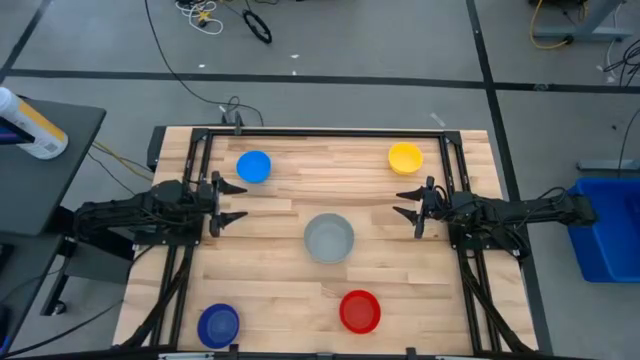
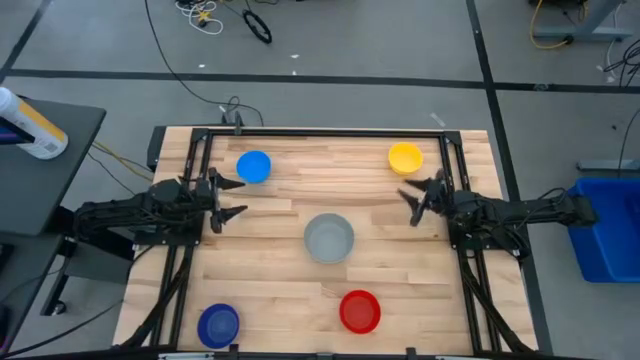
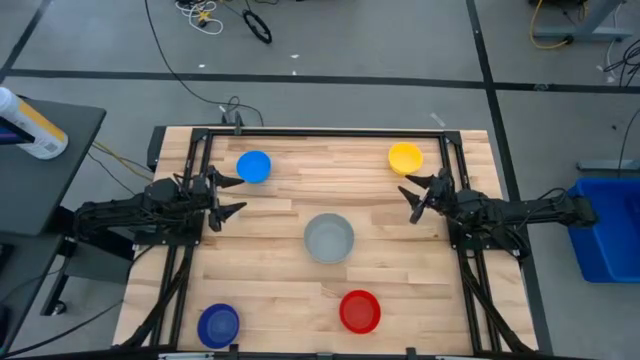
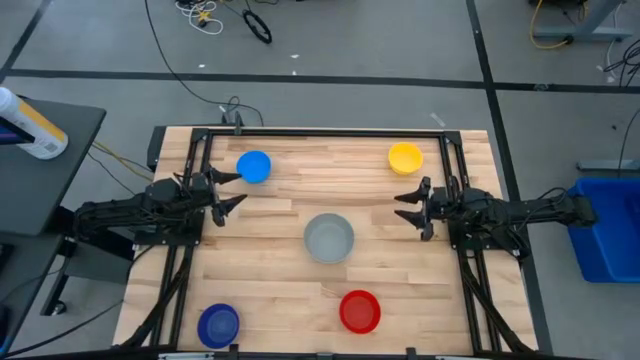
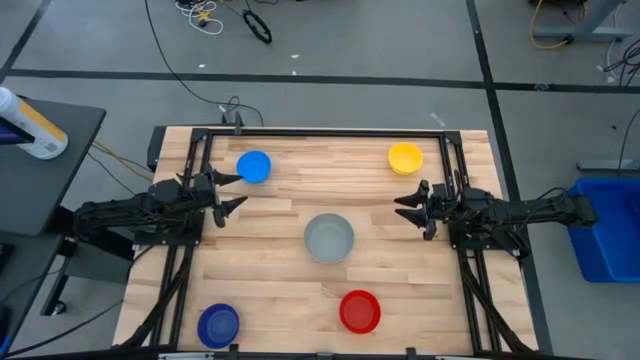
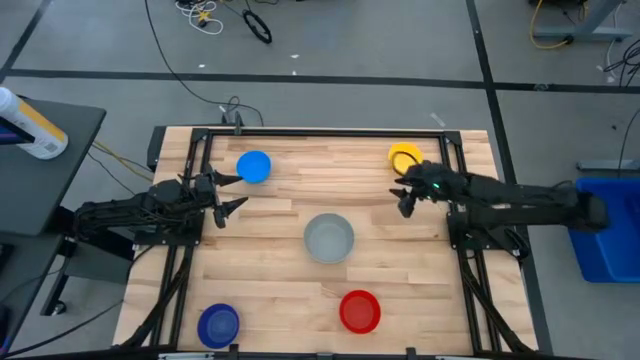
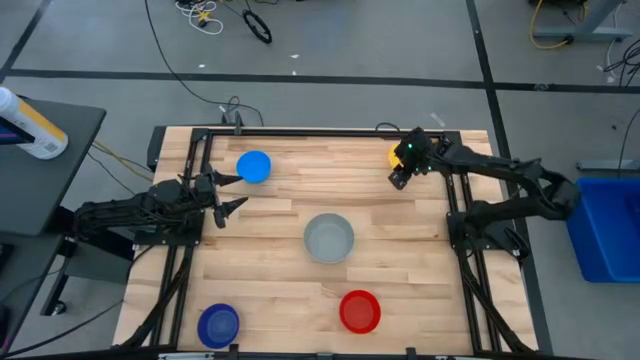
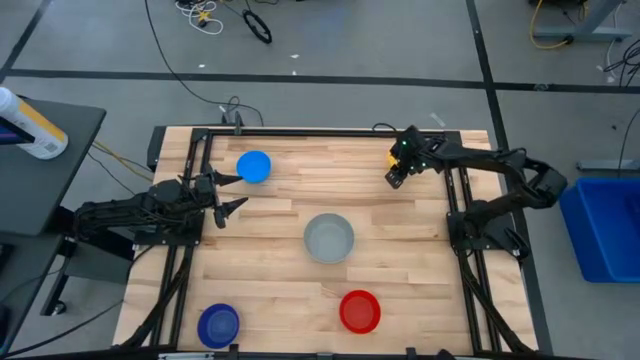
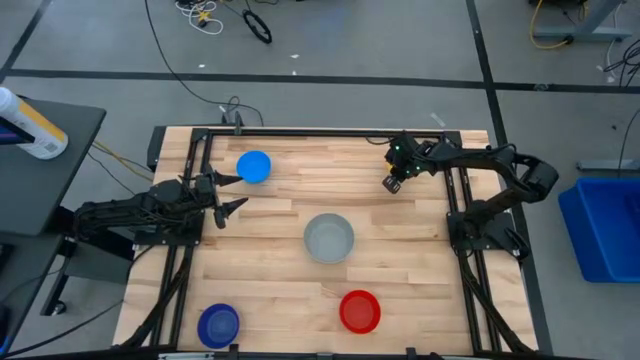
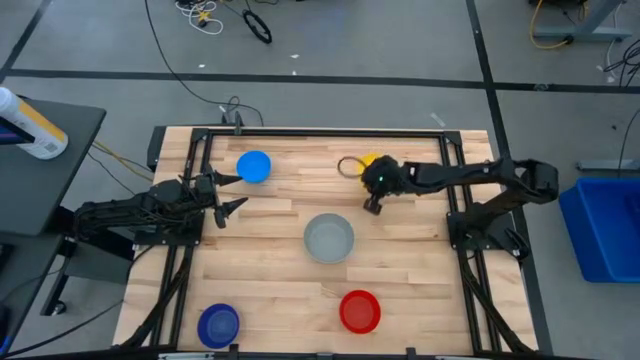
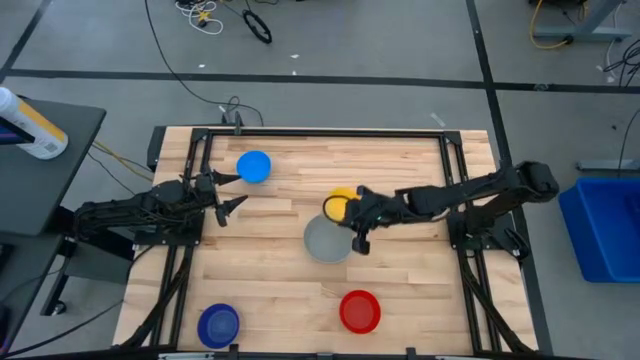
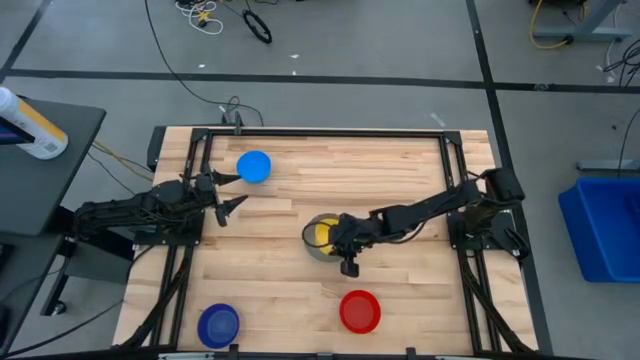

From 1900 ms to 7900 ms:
Stack the yellow bowl on top of the gray bowl

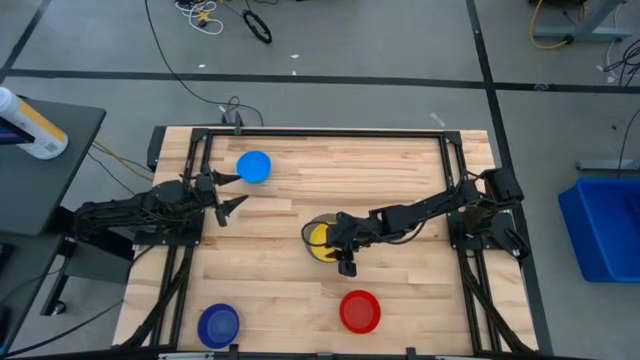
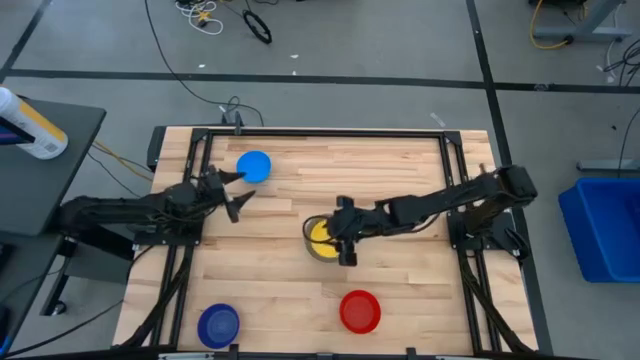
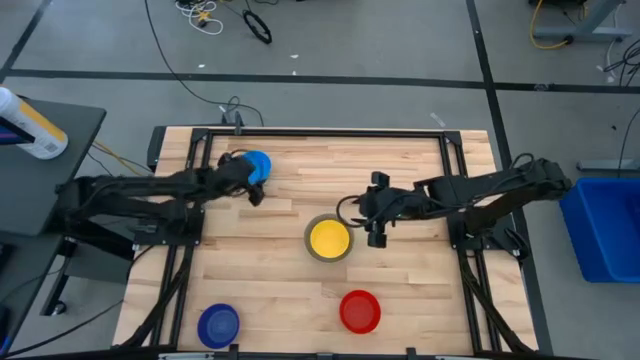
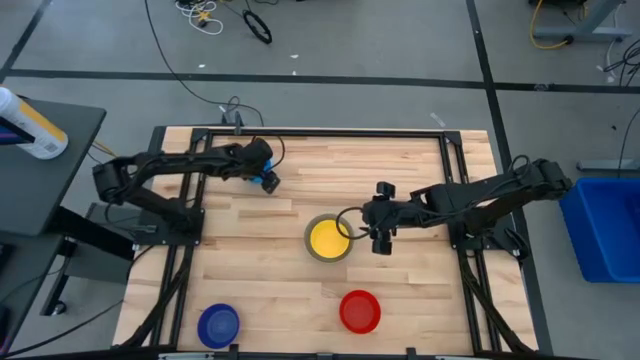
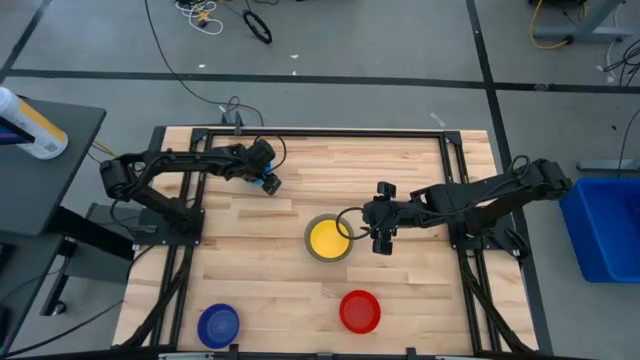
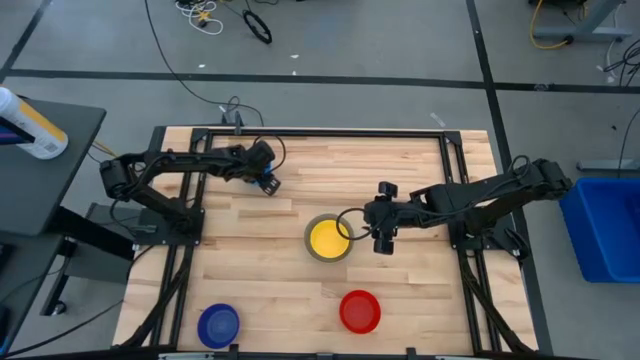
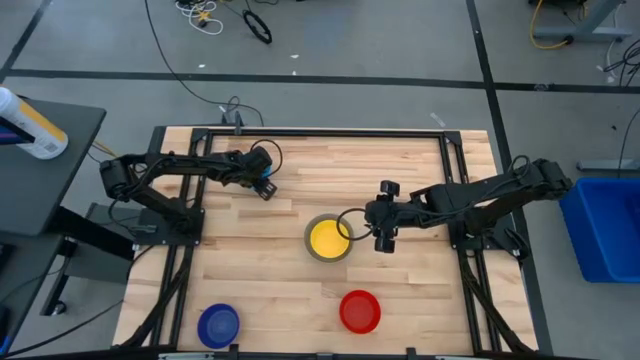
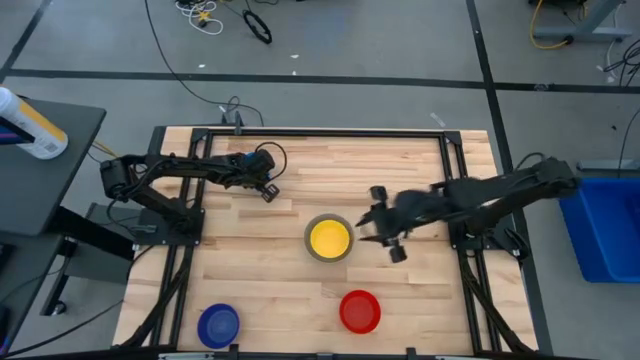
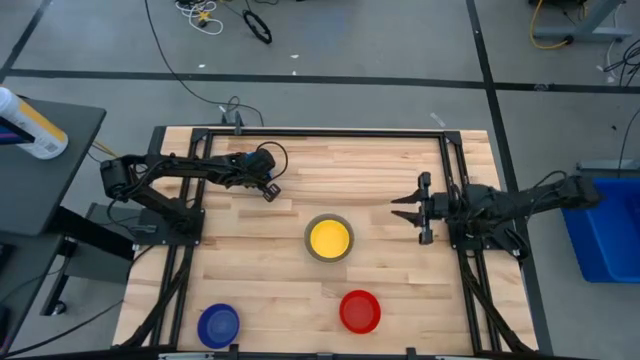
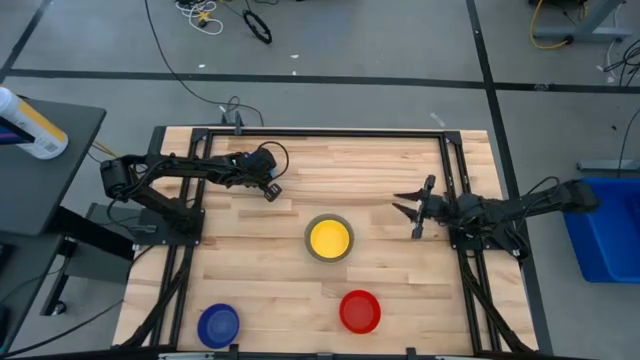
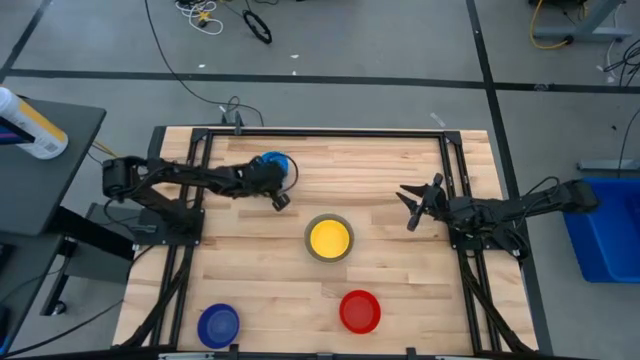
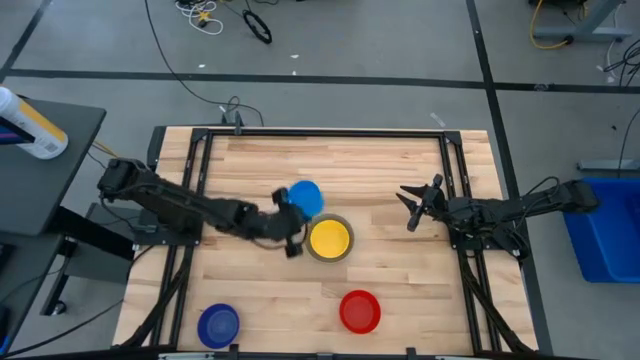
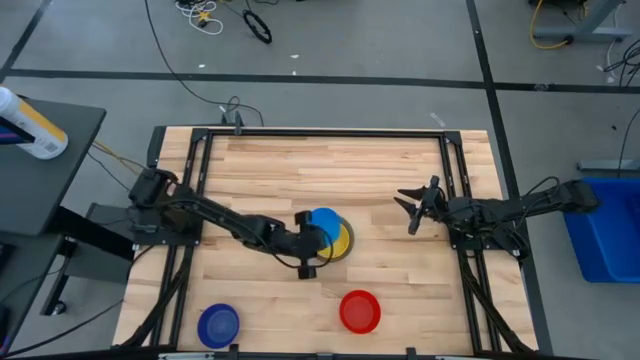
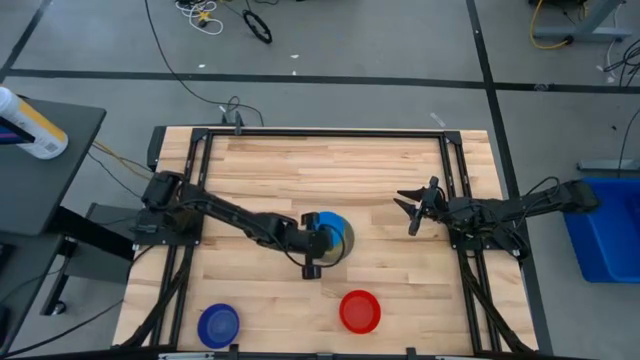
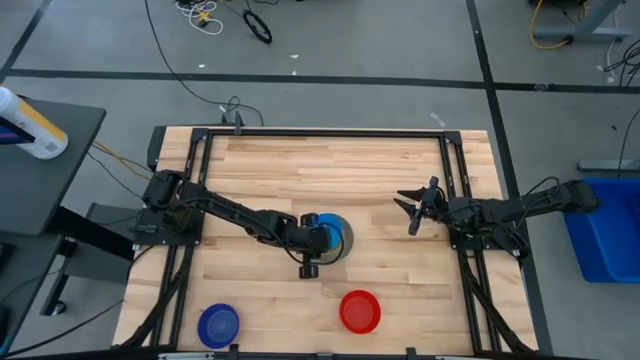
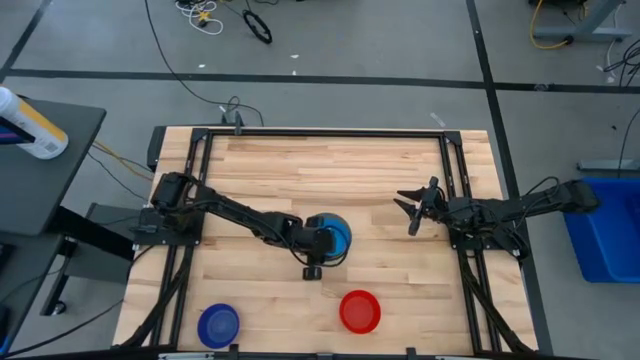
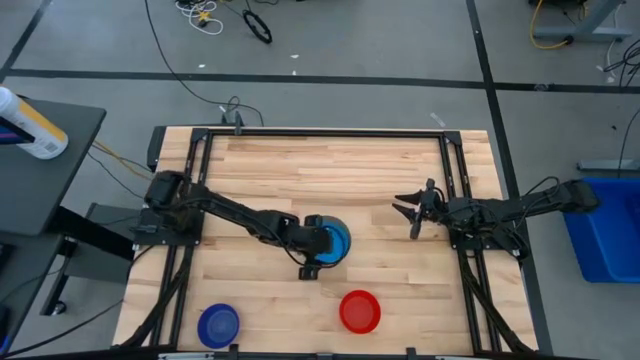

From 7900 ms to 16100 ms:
Stack the light blue bowl on top of the yellow bowl

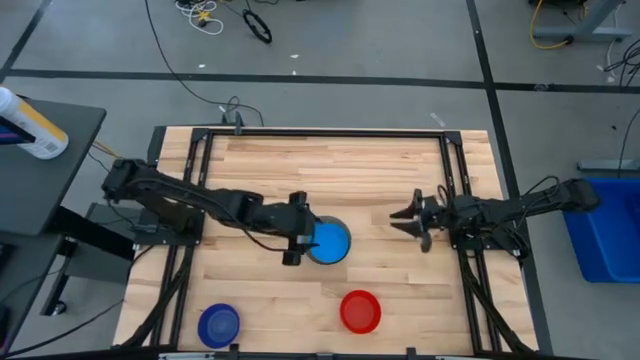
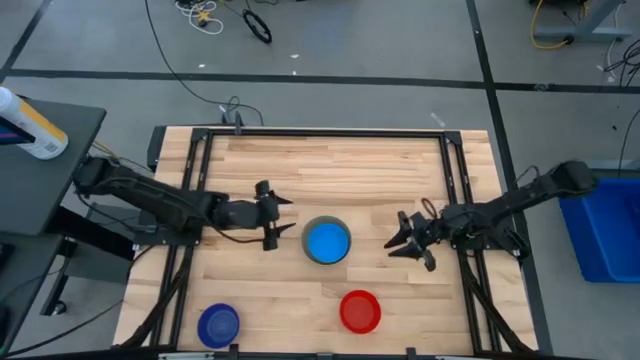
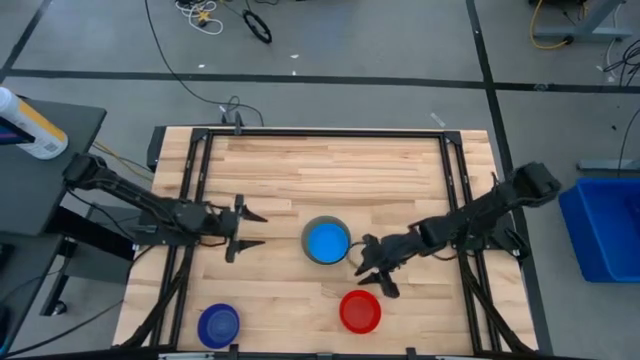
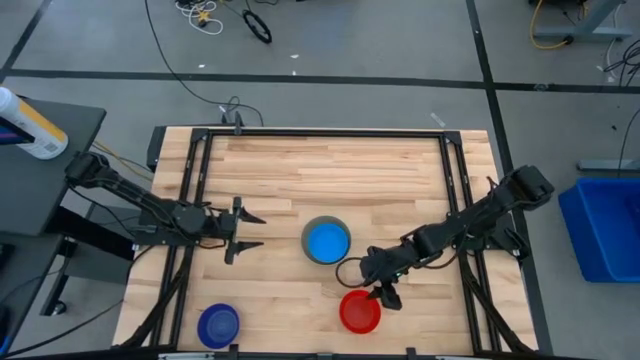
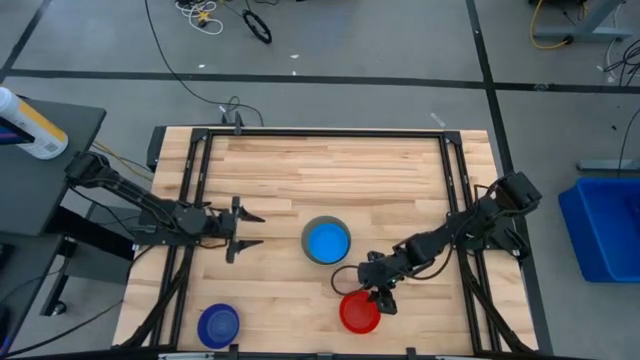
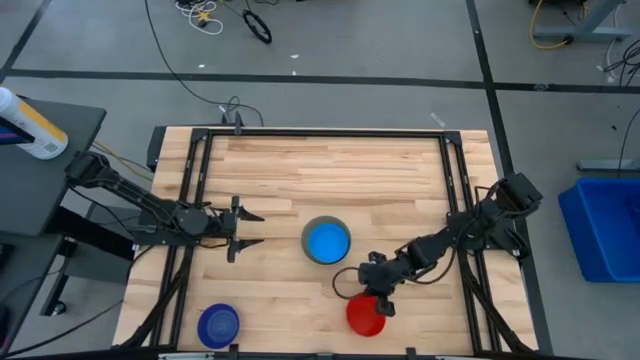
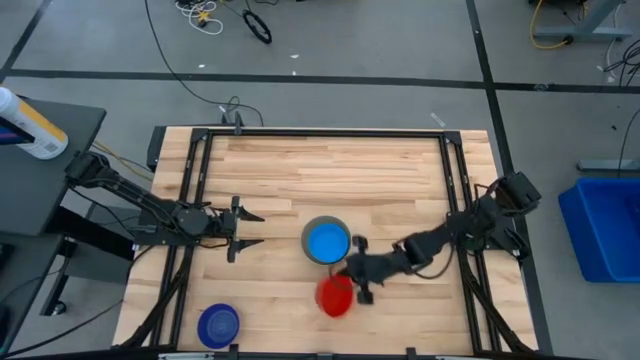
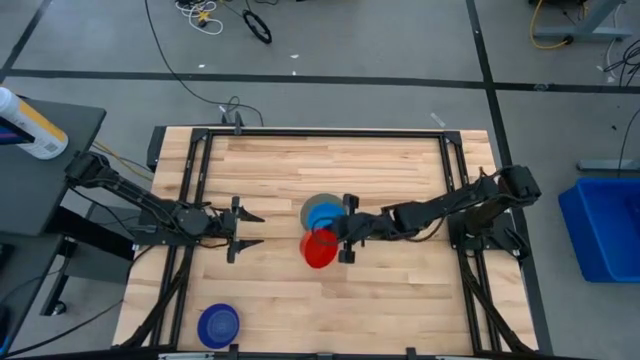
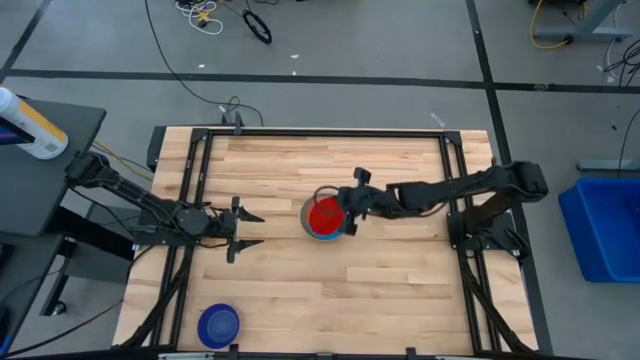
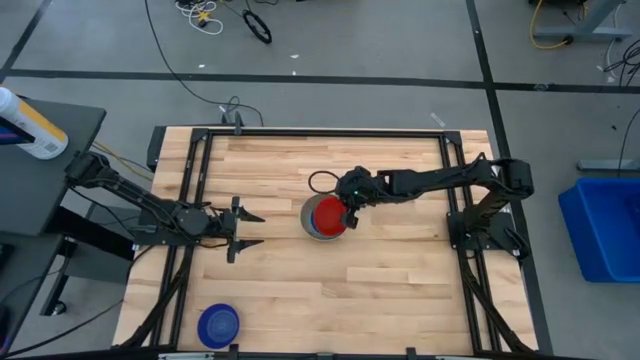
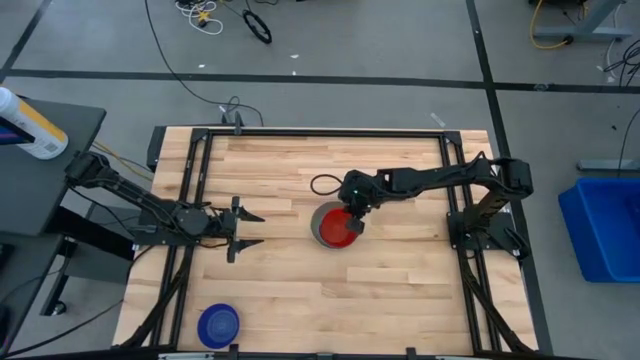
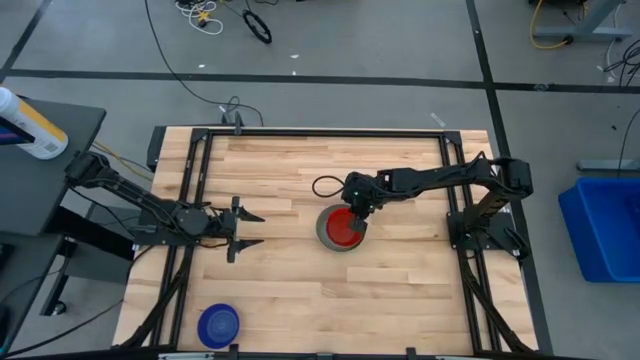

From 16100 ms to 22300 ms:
Stack the red bowl on top of the light blue bowl
